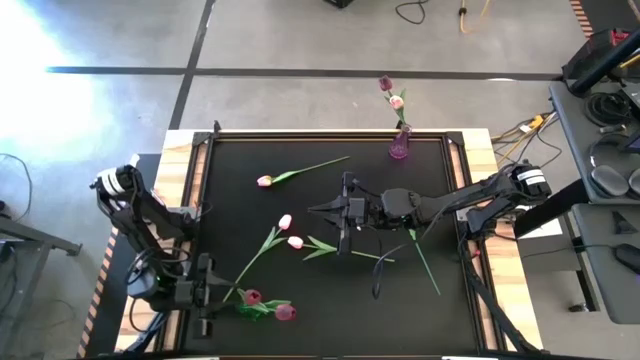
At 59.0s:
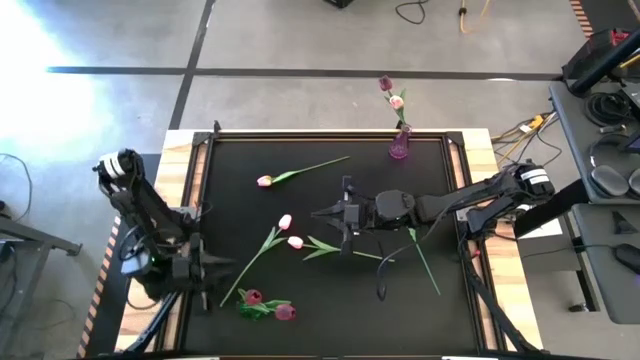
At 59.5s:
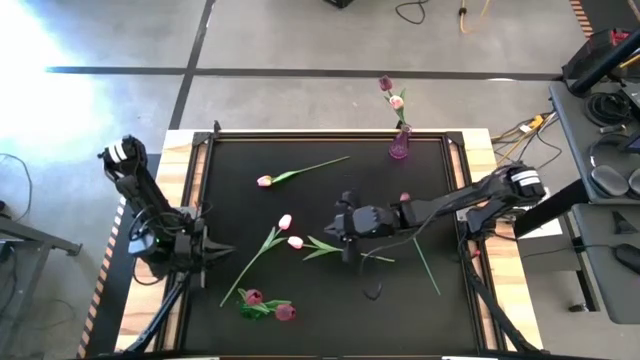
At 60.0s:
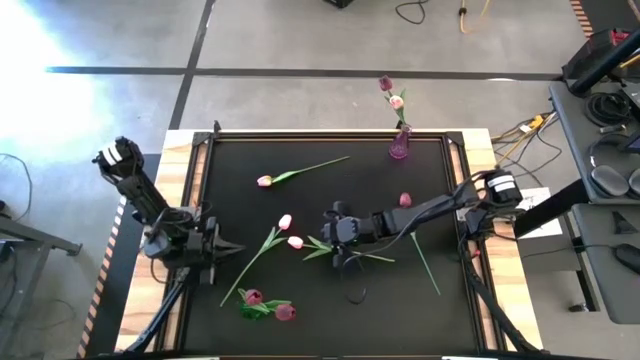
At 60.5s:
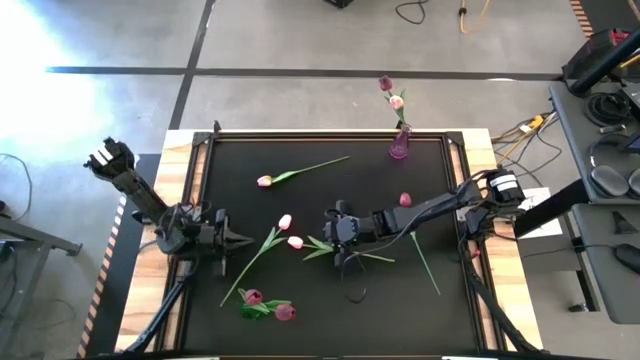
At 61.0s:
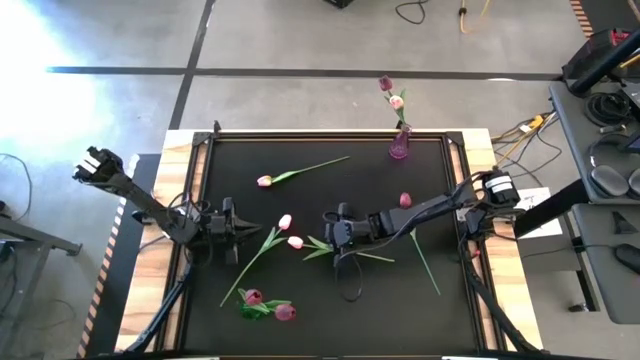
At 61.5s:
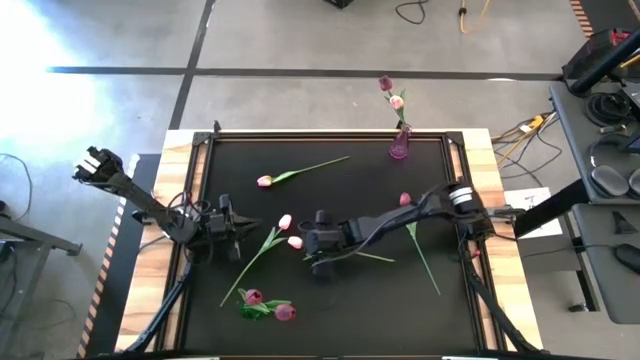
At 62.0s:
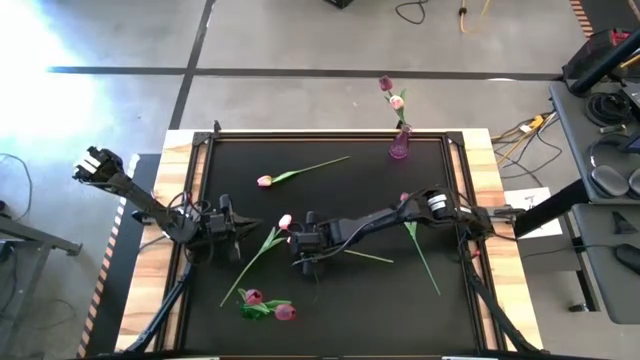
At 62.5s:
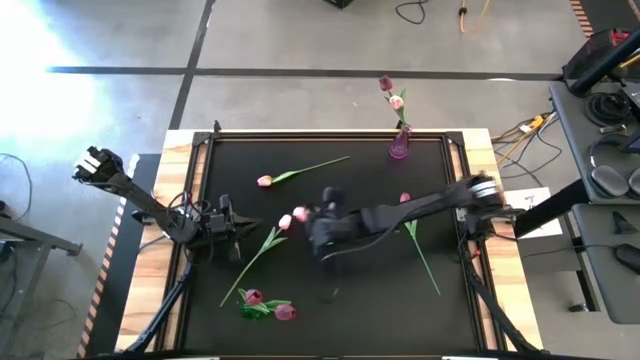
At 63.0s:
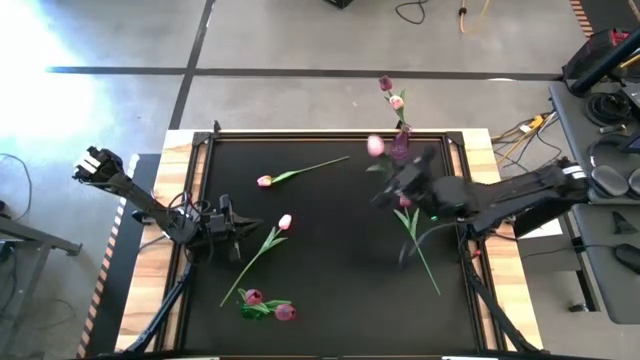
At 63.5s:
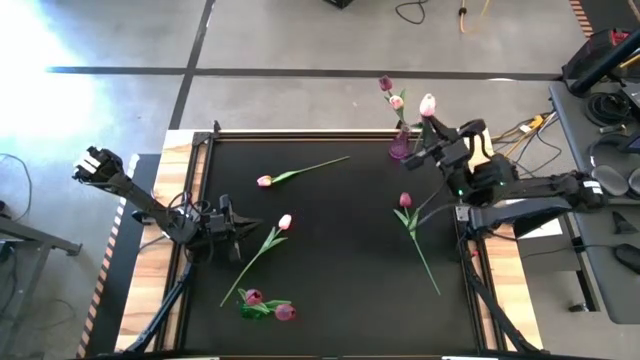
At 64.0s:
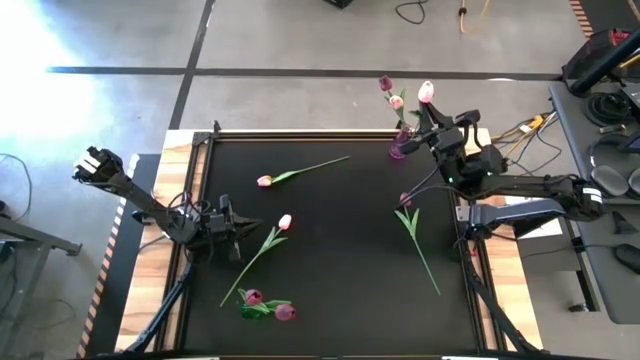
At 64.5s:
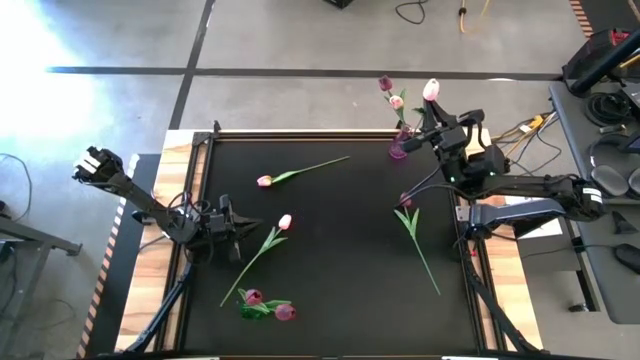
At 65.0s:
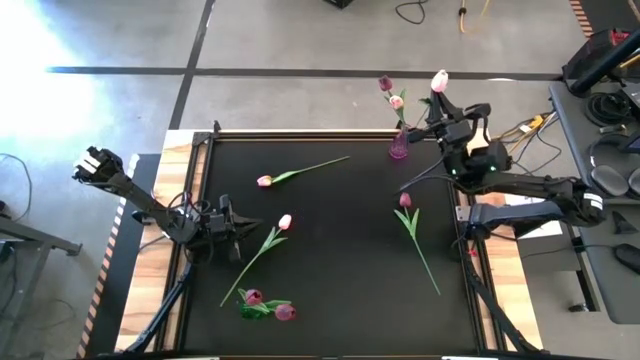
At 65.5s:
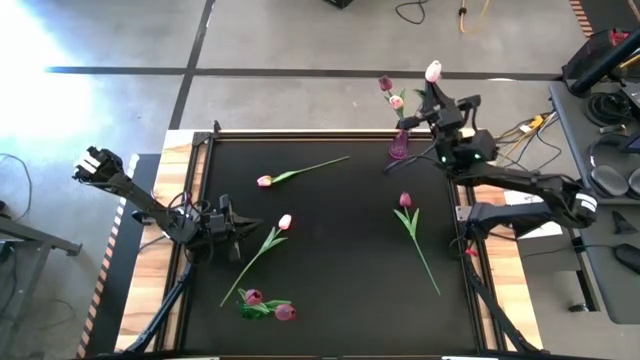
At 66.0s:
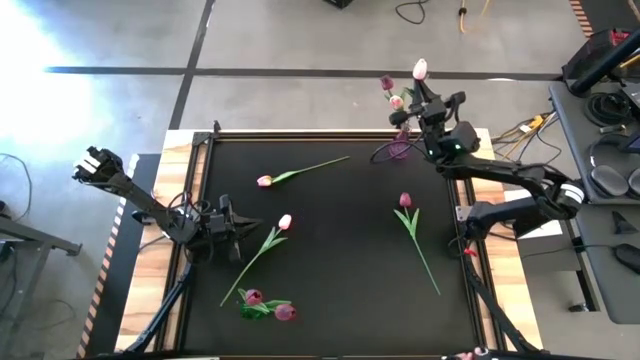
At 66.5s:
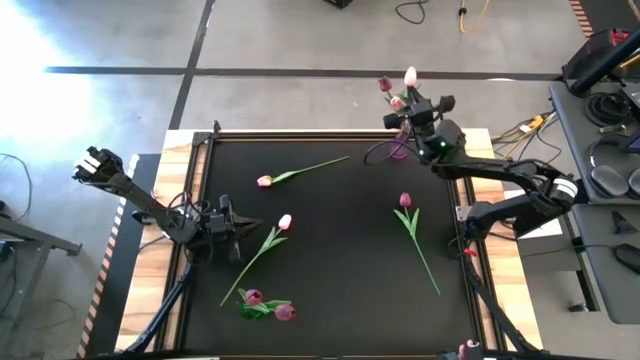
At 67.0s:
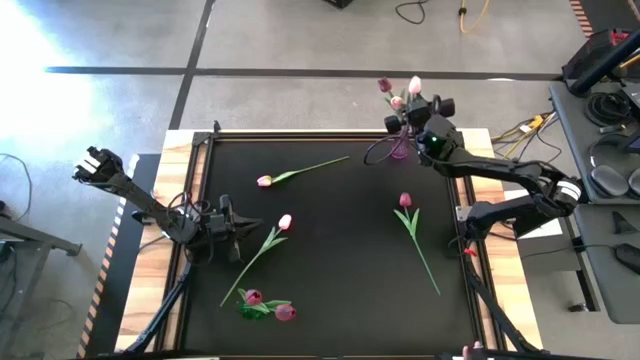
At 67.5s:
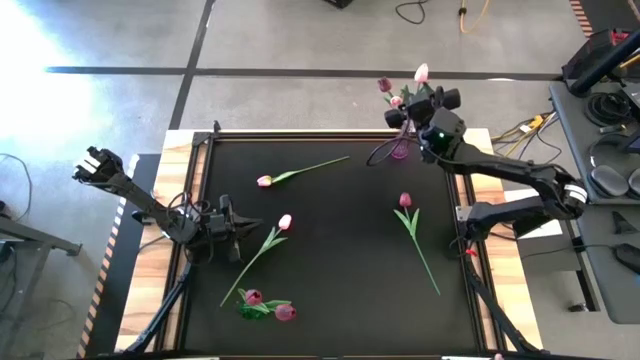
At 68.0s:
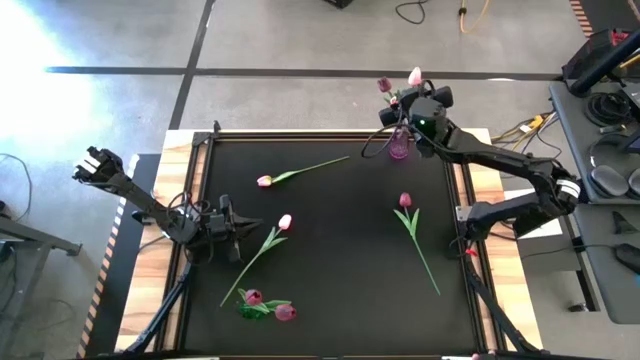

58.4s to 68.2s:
Task: Sort flowers into vase by color
Put the pink flower into the violet vase

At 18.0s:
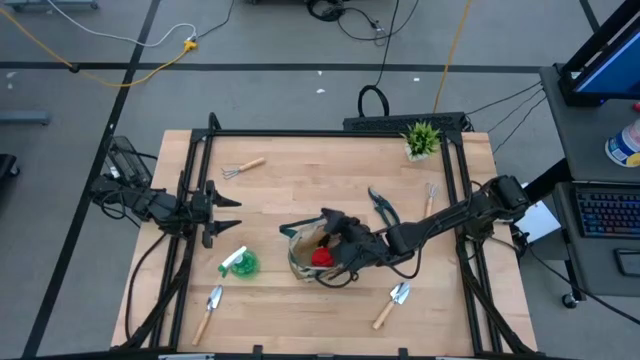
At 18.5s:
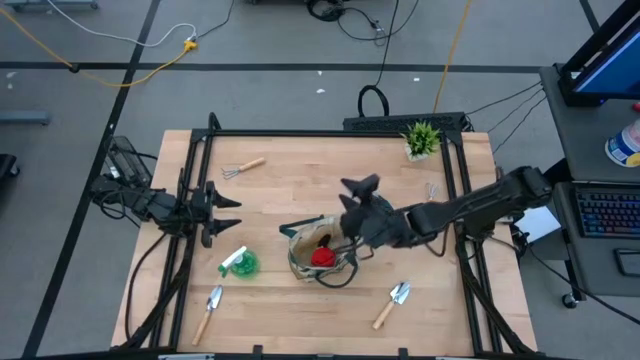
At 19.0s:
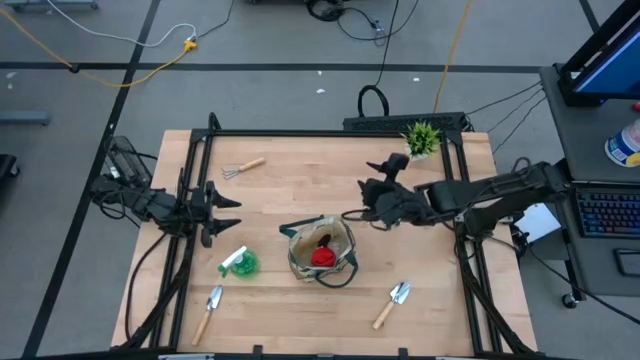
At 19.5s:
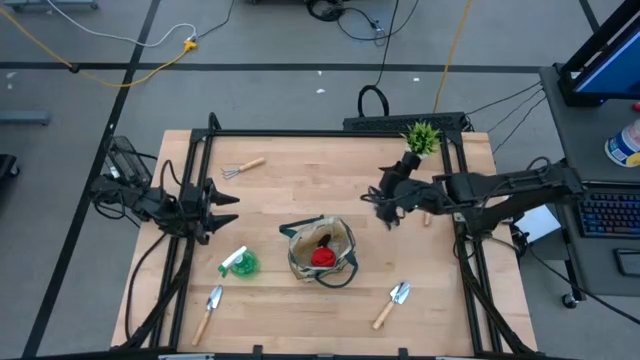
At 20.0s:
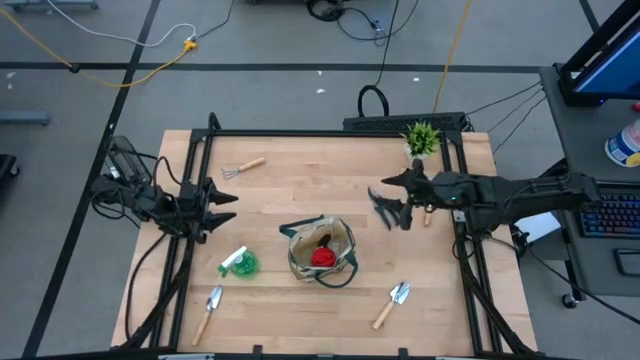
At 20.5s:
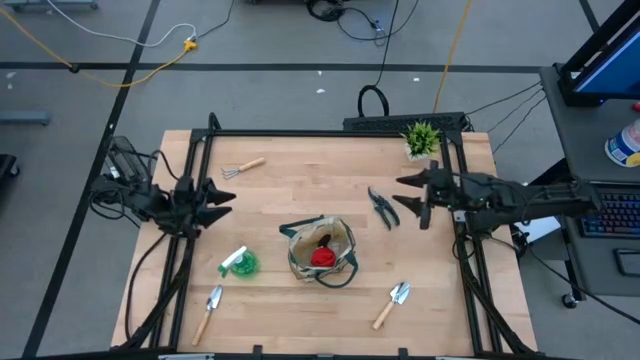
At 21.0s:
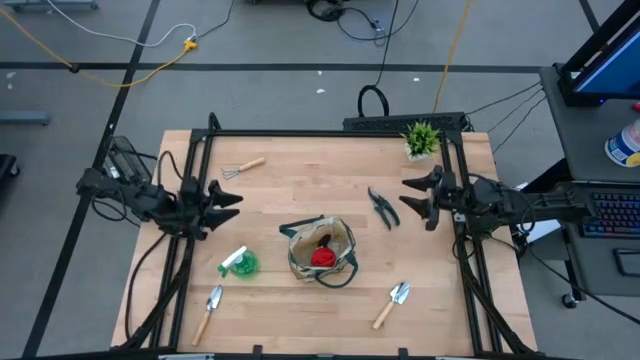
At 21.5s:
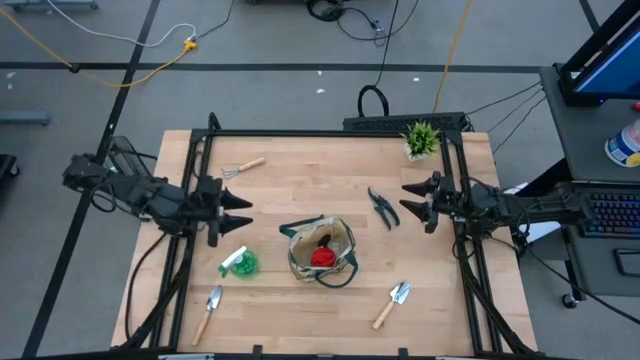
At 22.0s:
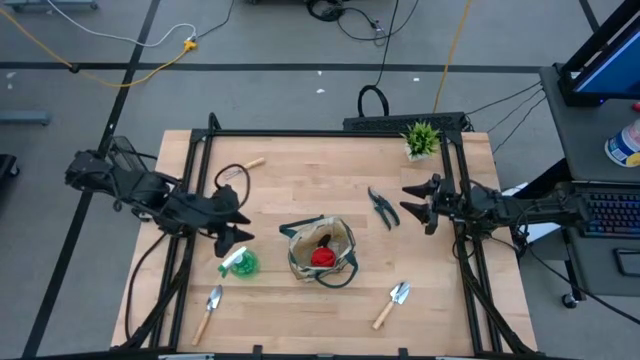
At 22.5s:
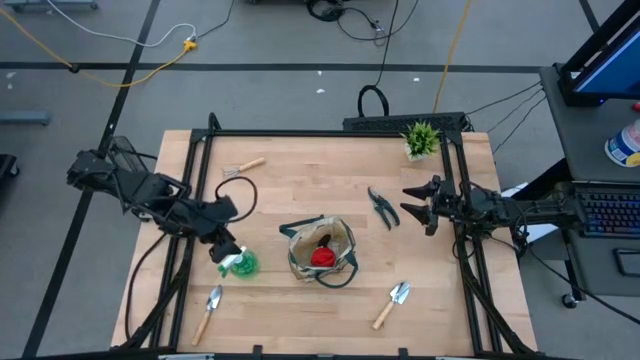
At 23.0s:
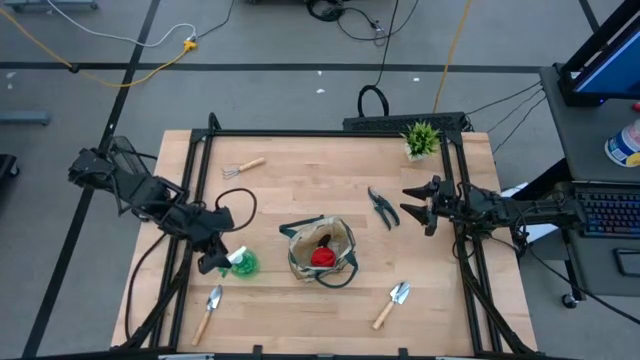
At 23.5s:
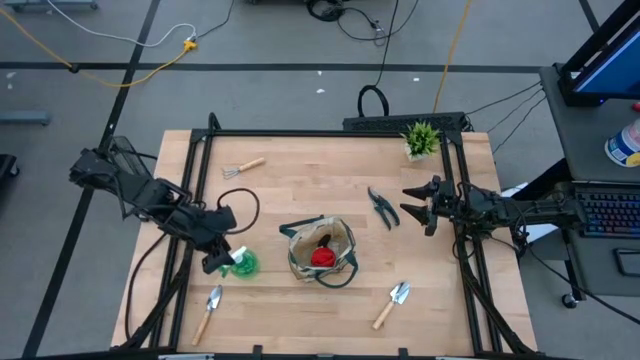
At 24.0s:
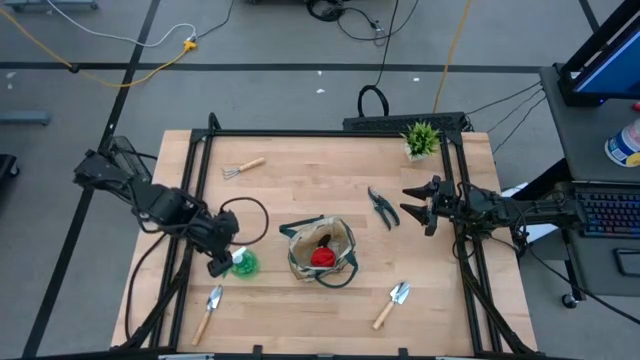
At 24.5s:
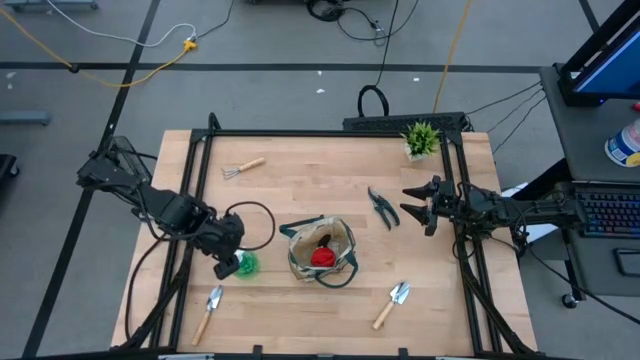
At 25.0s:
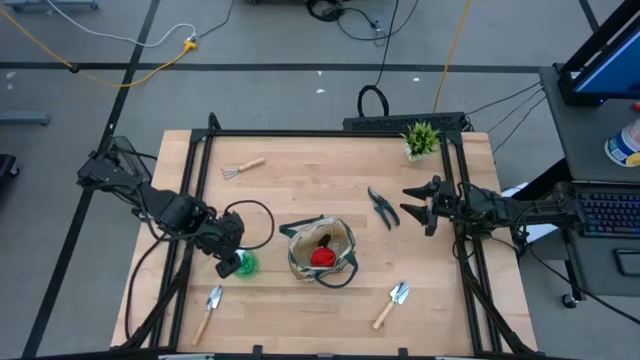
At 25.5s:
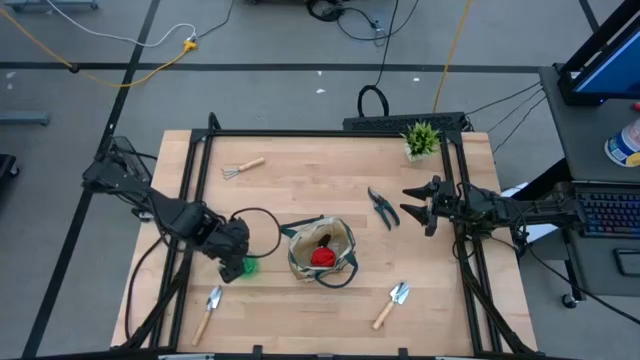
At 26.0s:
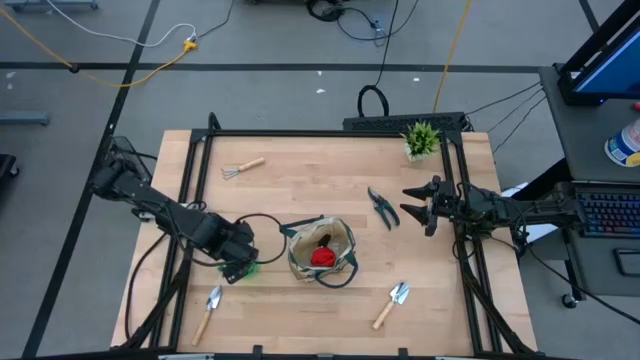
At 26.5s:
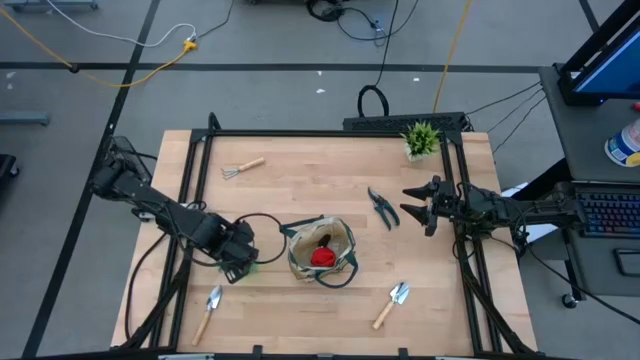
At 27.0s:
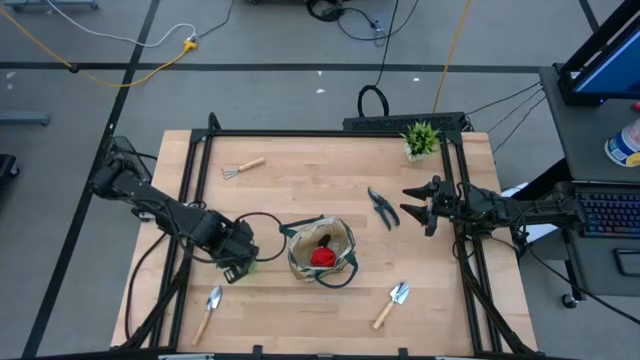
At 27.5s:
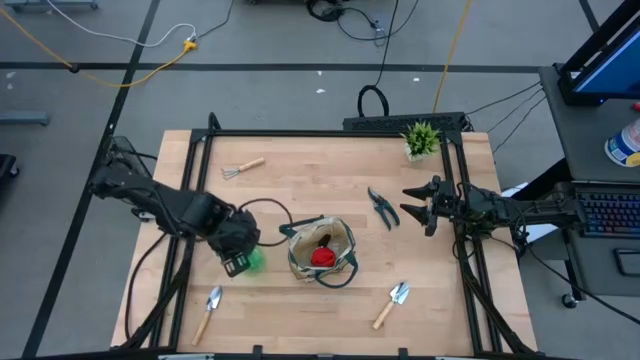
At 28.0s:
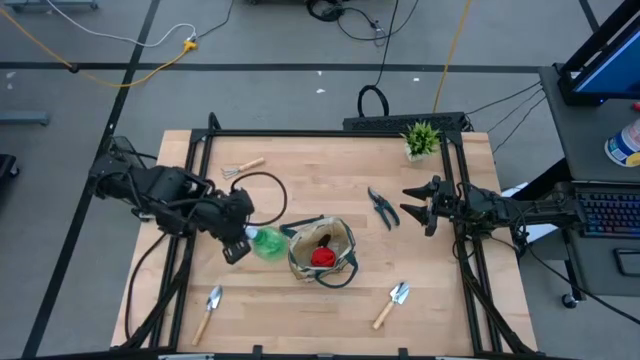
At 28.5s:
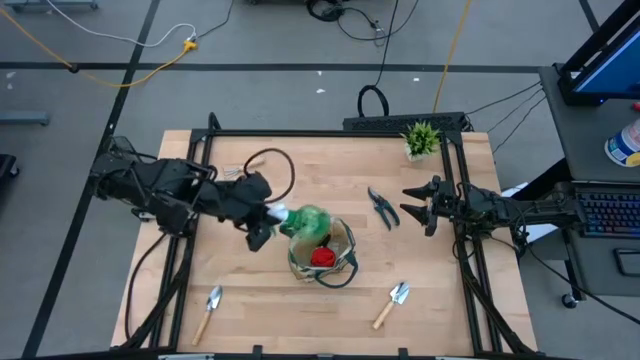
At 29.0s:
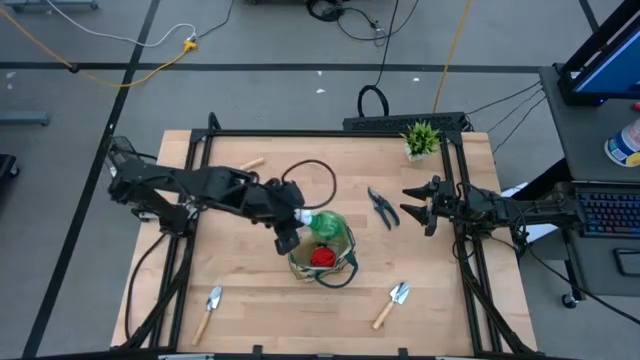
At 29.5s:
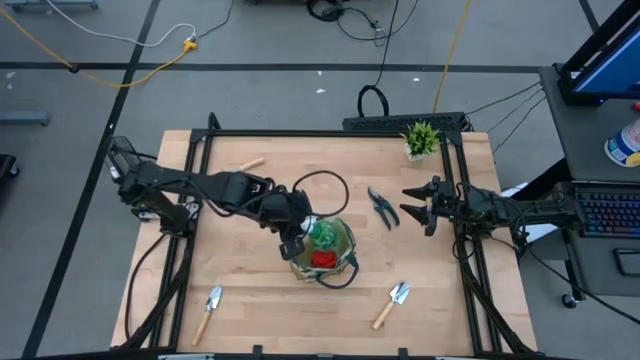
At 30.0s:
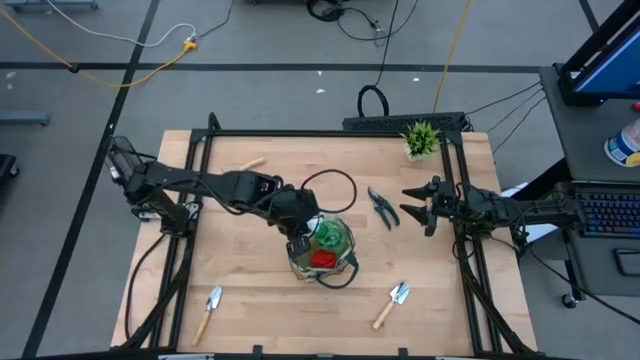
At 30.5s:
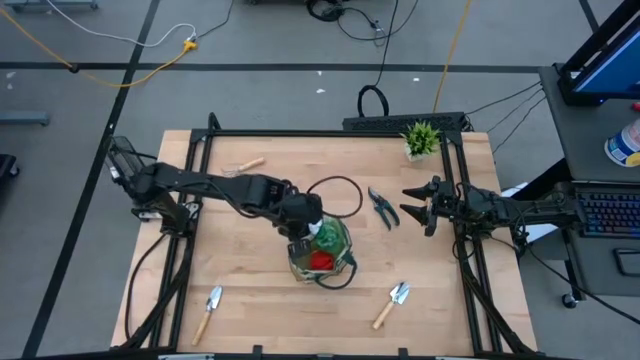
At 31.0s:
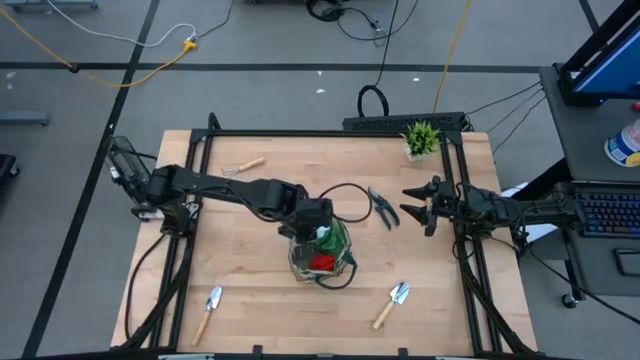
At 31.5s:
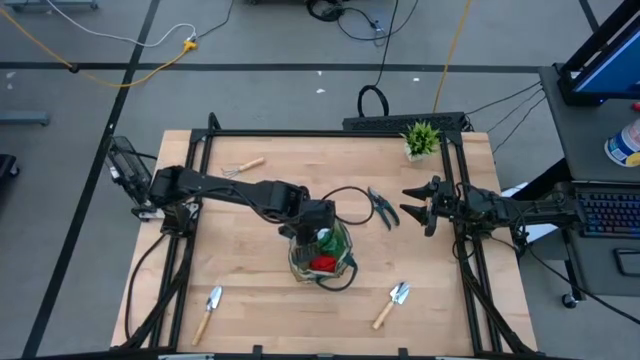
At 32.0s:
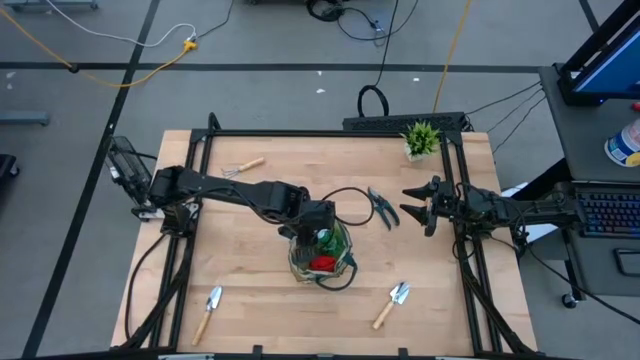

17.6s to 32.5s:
Task: Pick & Place Garden tools in Gardening bag
Put the green spray bottle into the gardening bag
